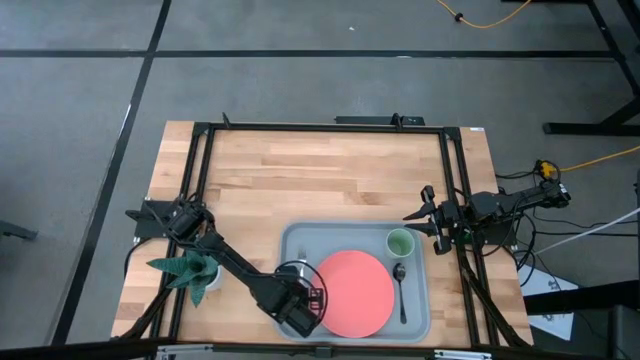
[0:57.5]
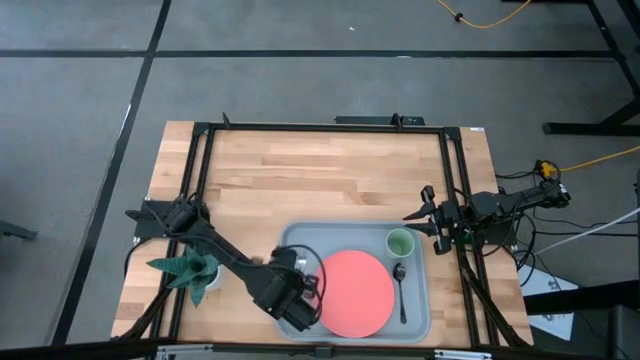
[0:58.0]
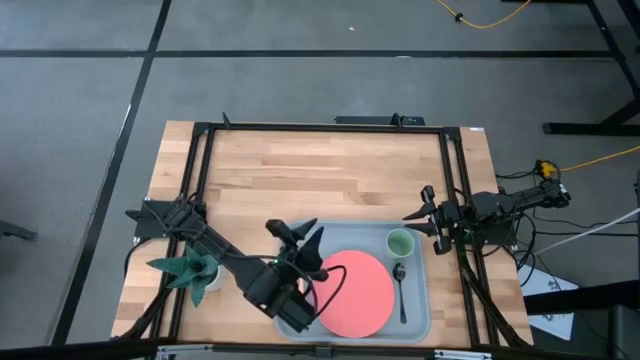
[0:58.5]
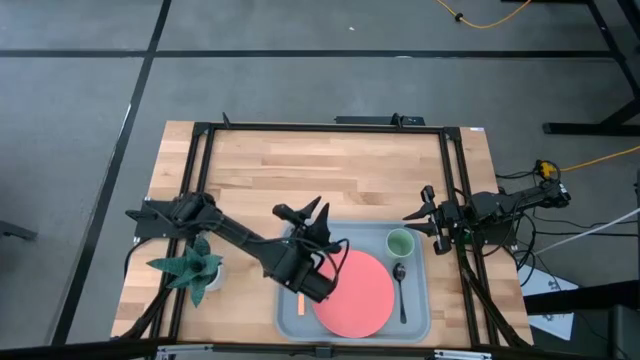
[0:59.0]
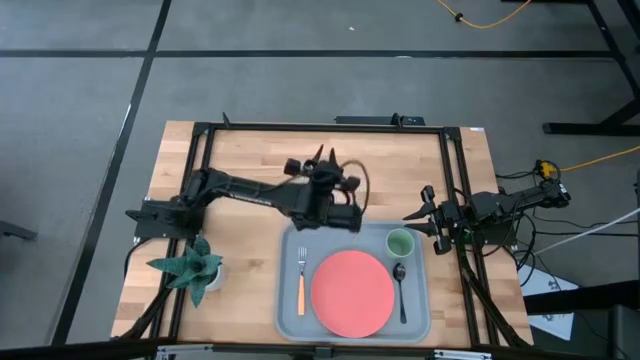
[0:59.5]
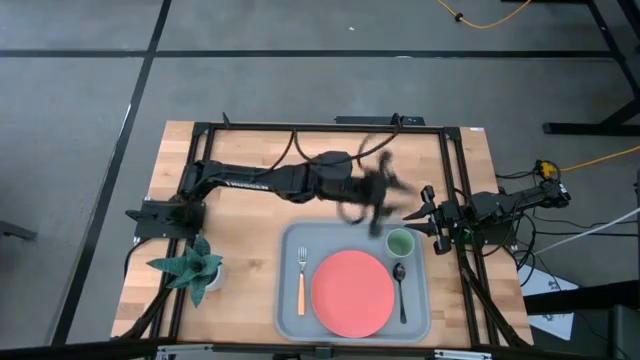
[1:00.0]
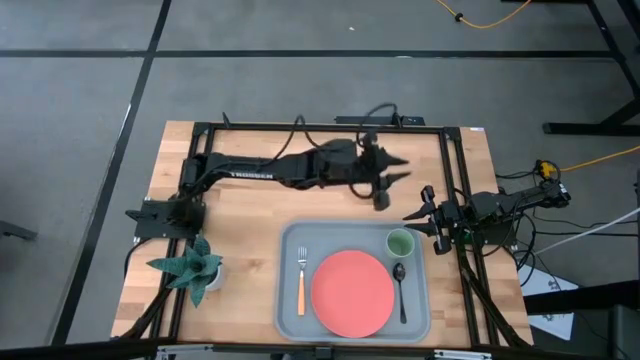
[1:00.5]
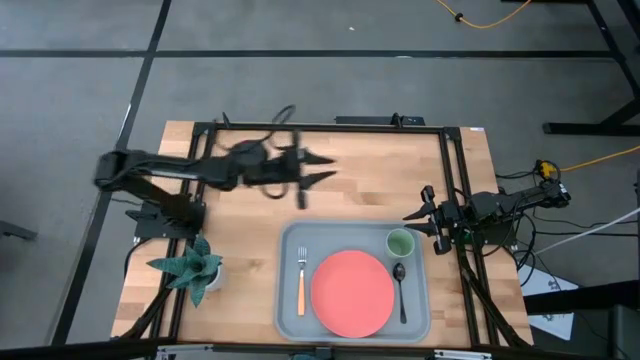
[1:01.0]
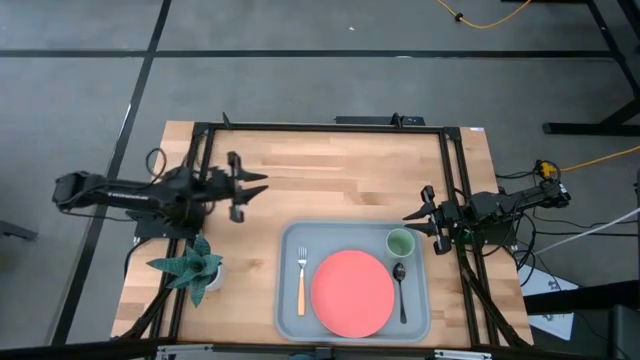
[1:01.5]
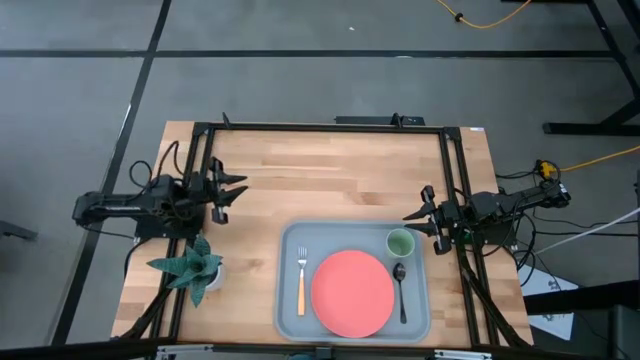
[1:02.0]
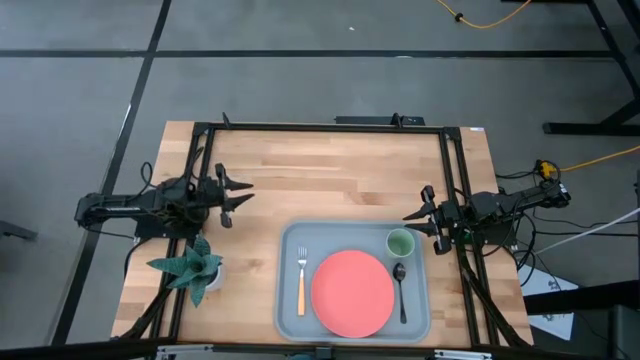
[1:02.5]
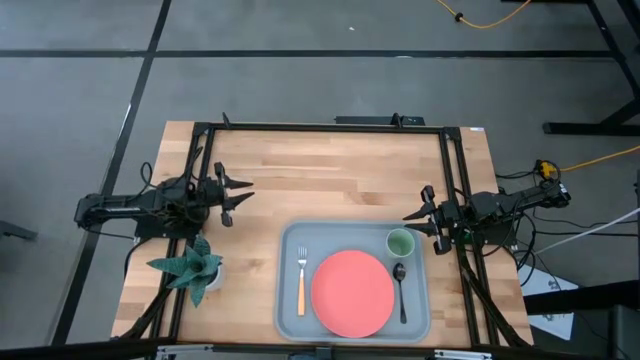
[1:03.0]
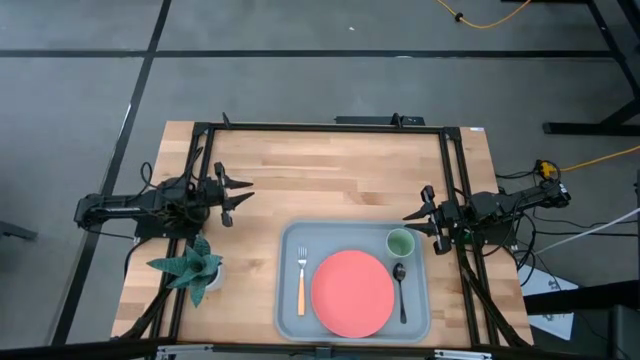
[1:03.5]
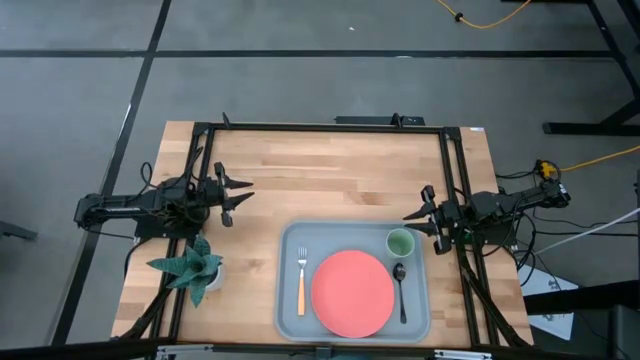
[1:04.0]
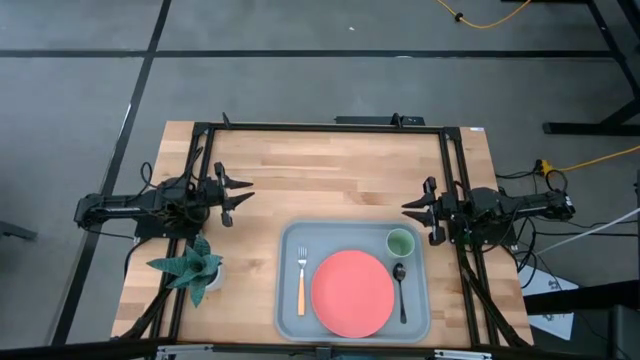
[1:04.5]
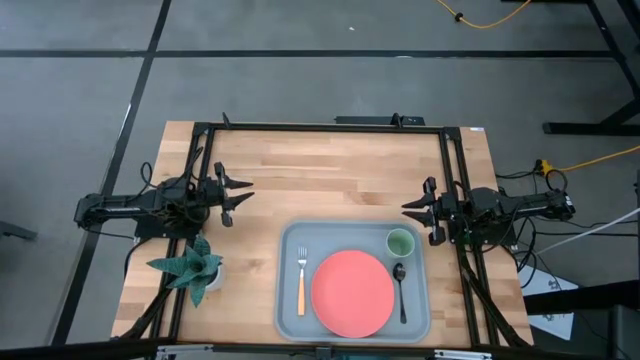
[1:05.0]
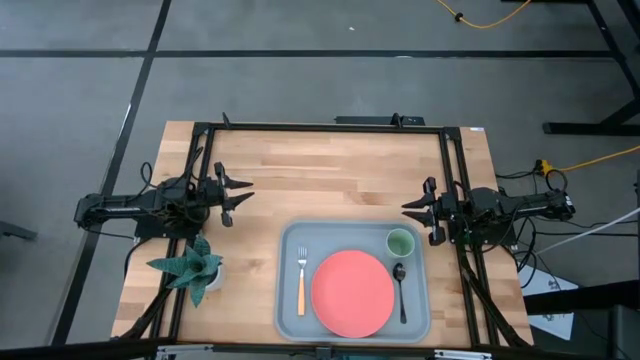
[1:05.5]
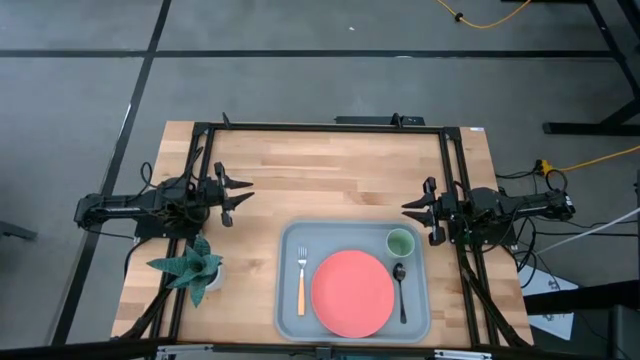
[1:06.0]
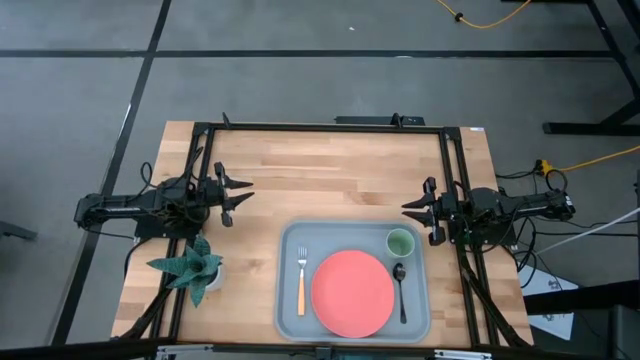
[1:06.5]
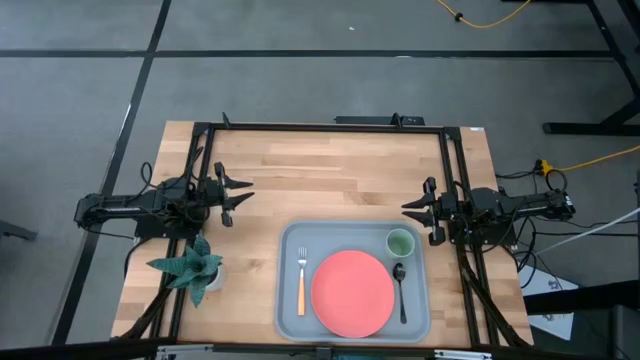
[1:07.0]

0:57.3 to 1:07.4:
Task: Pick and place plate/cup/fork/spoon on tray
Return to Home Position

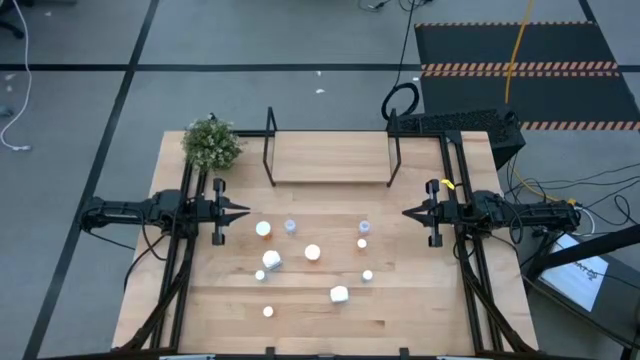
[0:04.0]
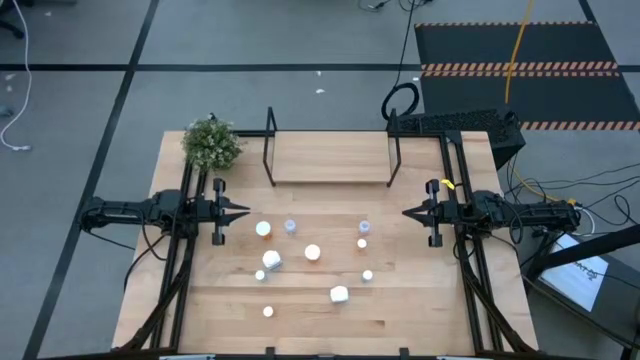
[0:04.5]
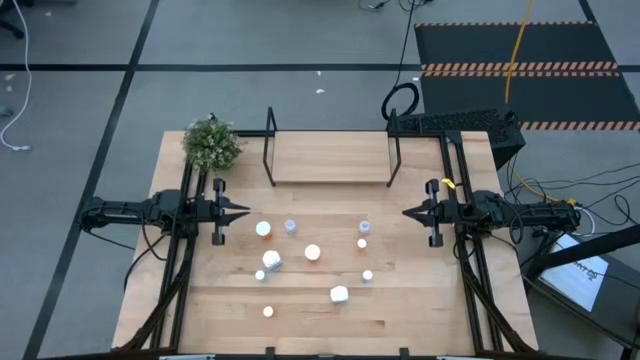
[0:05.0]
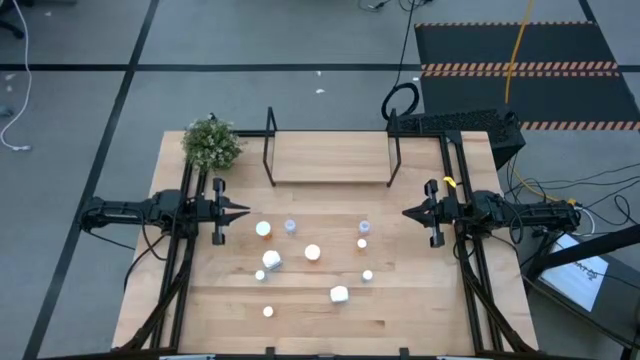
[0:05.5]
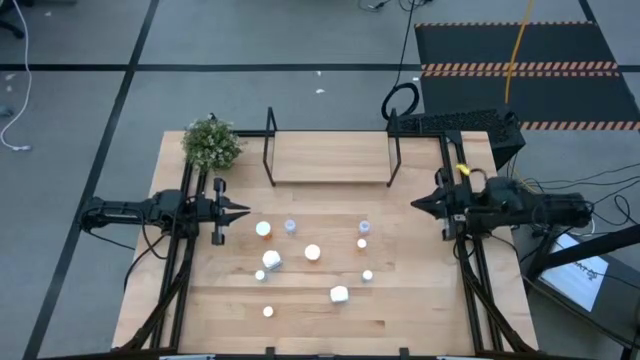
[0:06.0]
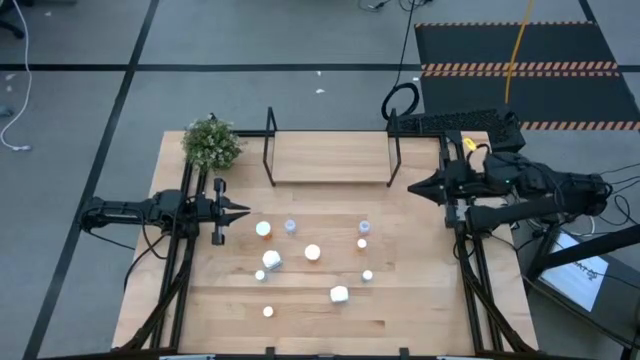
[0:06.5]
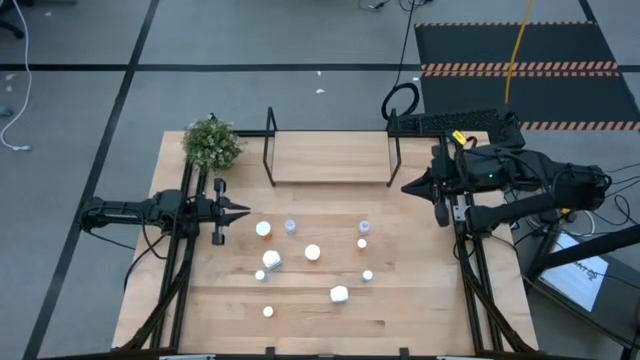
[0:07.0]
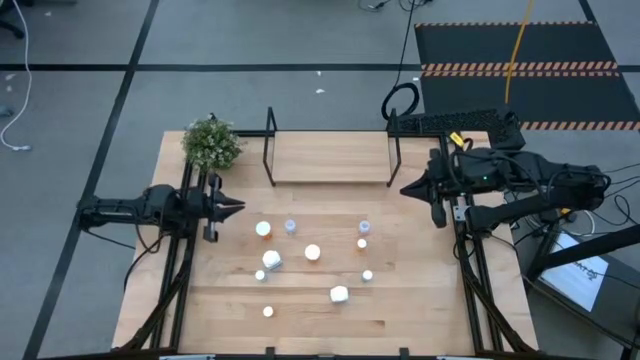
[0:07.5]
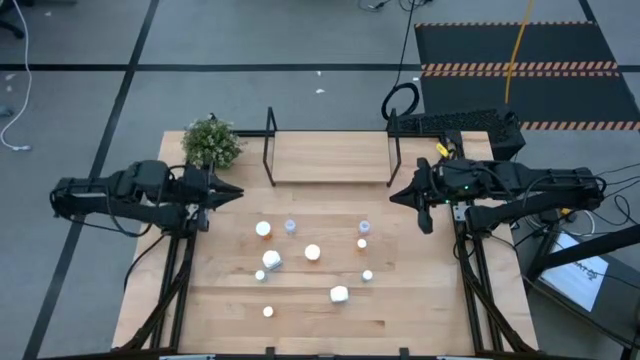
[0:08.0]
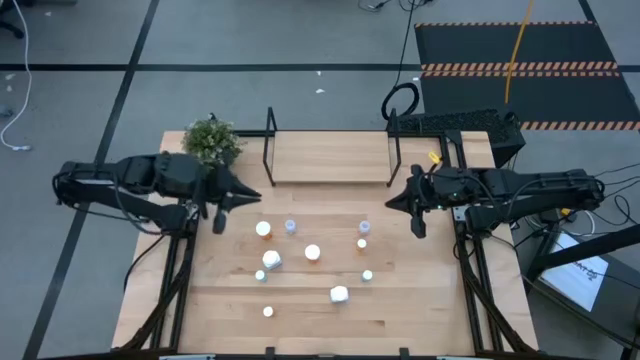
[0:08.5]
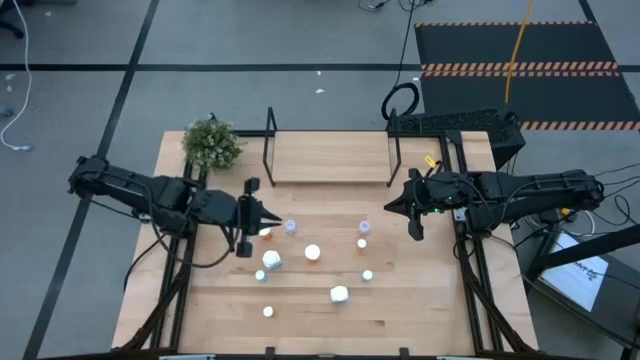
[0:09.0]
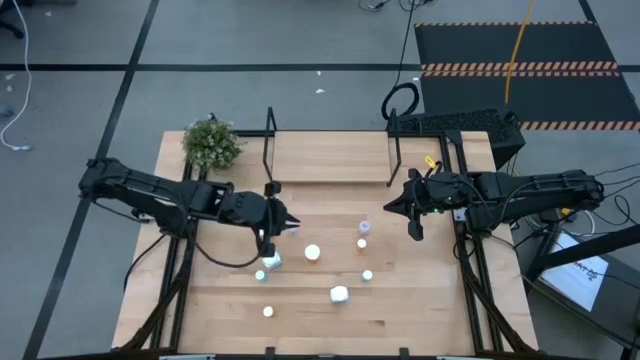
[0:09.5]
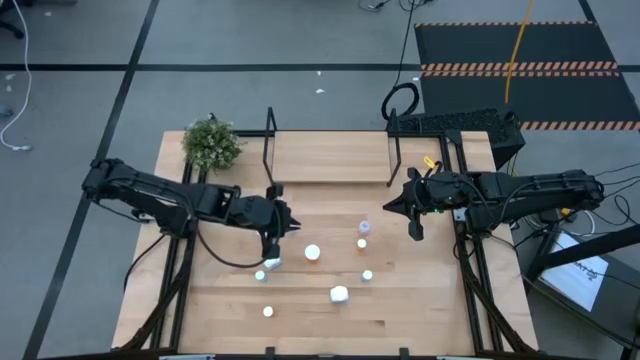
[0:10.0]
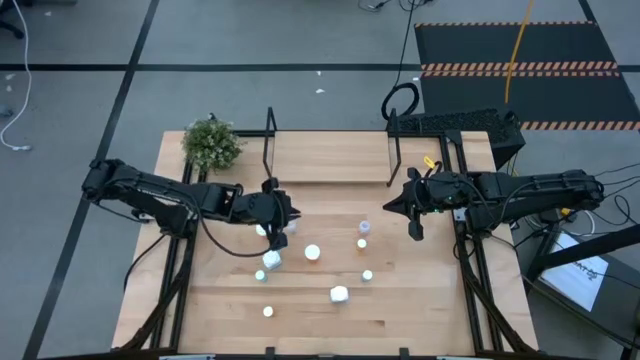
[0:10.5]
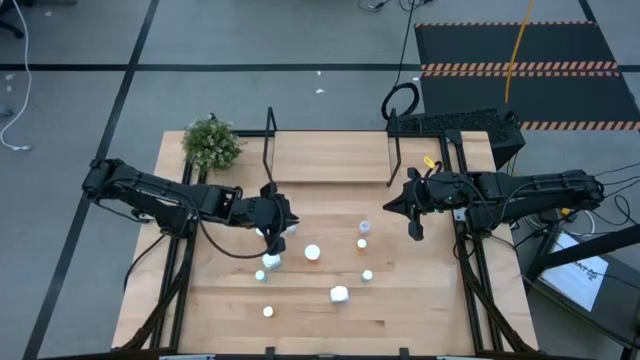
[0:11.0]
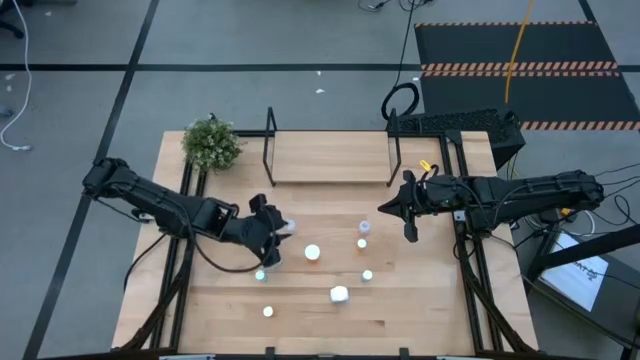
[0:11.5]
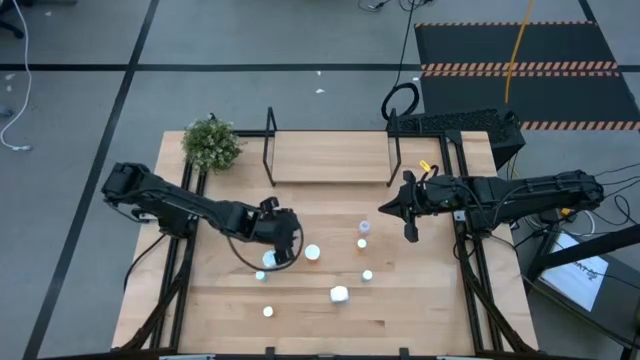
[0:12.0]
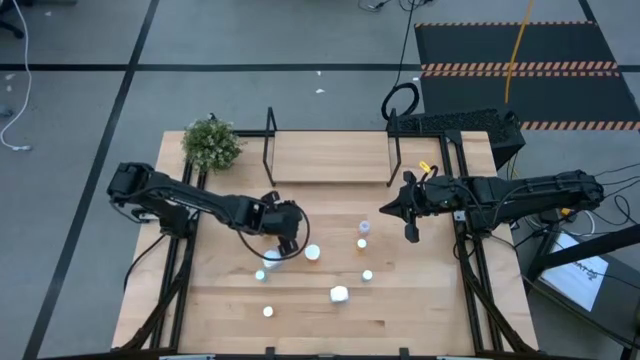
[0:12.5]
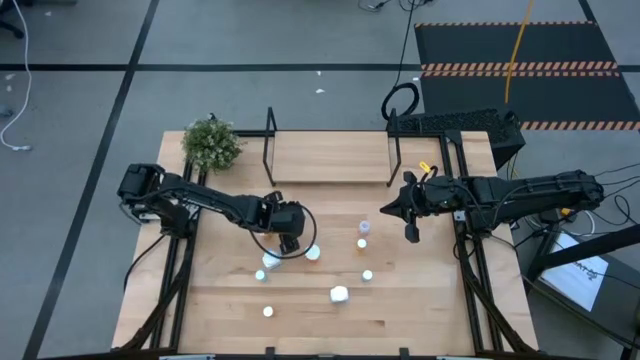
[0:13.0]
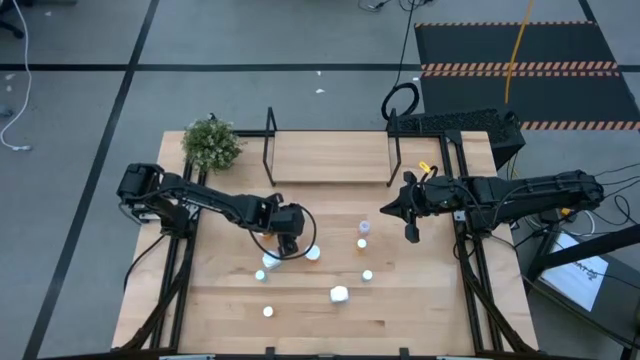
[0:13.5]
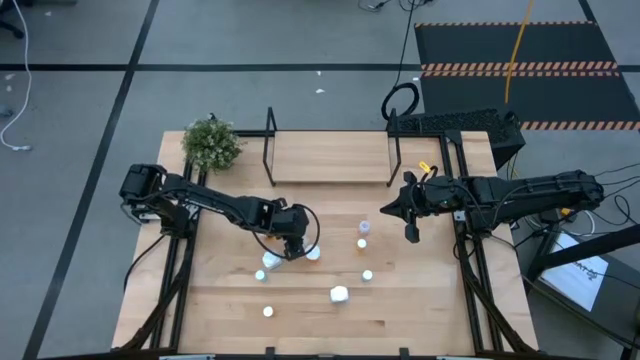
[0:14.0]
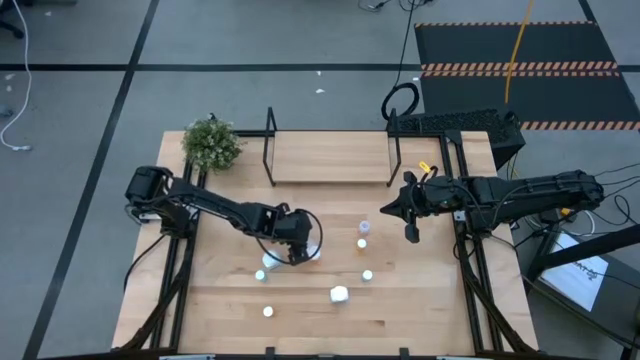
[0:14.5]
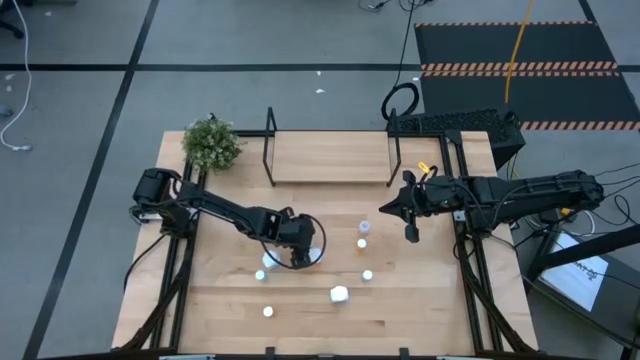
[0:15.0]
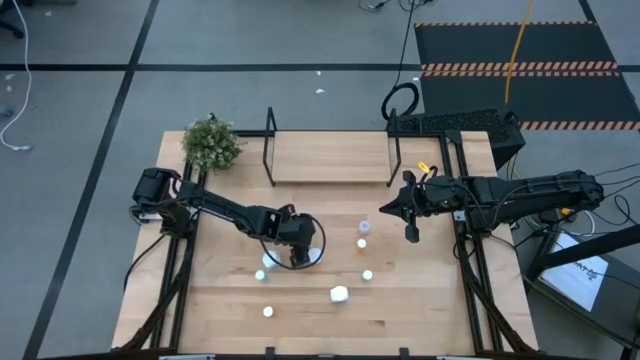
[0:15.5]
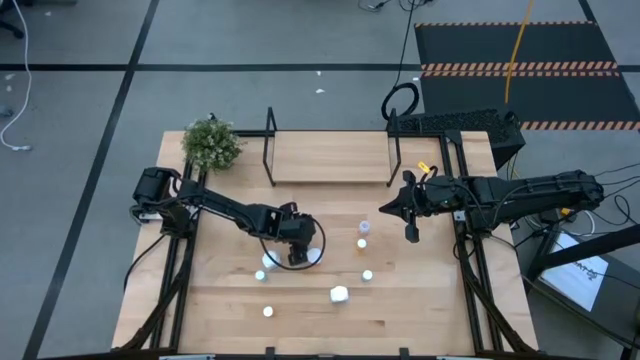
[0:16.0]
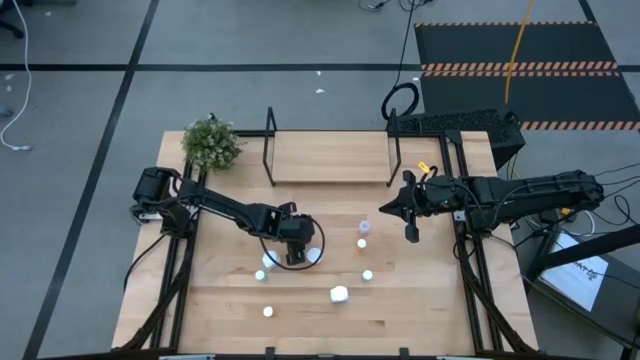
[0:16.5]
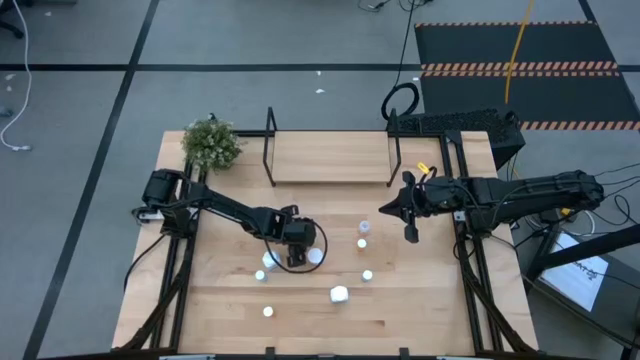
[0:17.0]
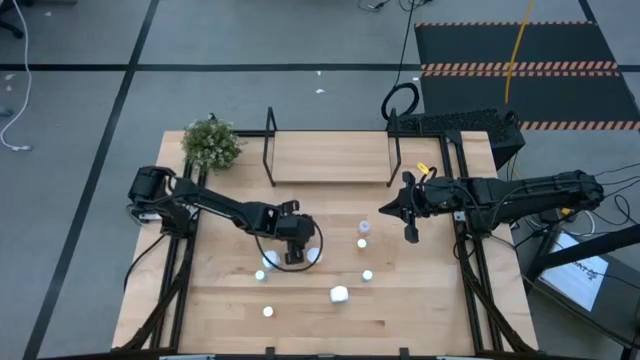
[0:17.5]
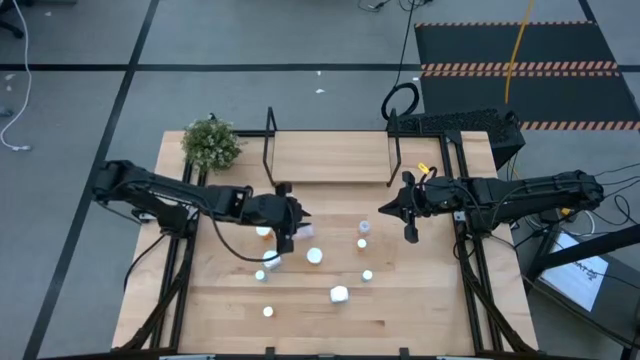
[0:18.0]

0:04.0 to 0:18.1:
Task: Pick and place medicine bottles onto shelf by color
Put the left transparent pill bottle on the shelf
